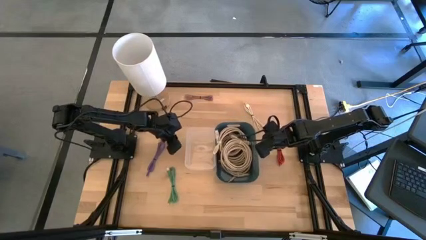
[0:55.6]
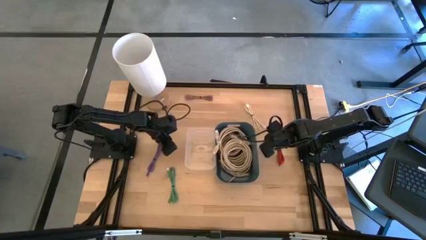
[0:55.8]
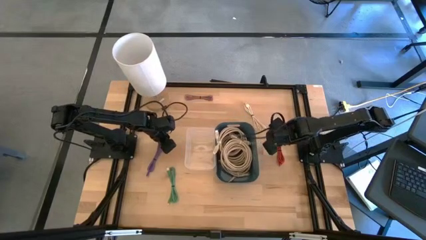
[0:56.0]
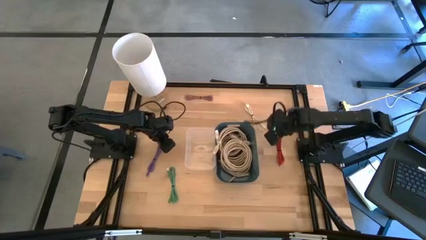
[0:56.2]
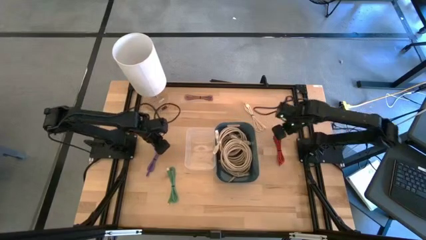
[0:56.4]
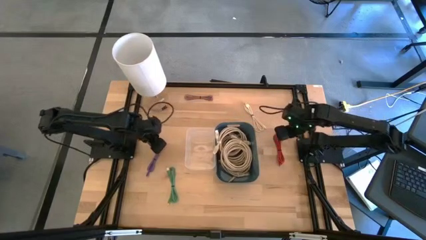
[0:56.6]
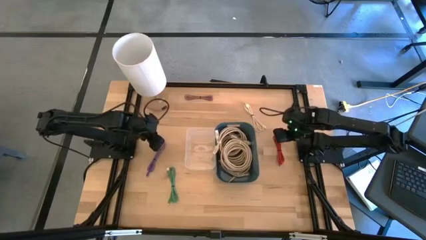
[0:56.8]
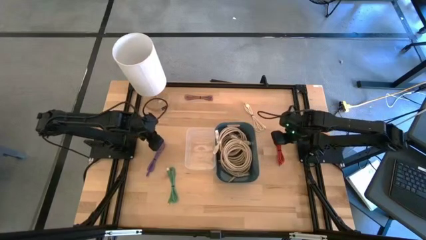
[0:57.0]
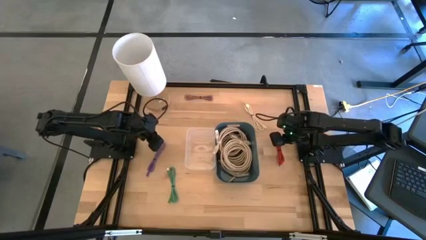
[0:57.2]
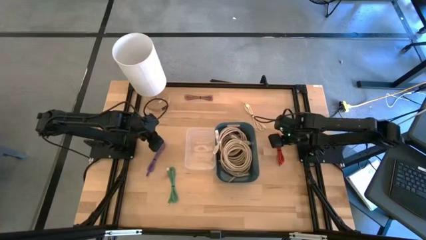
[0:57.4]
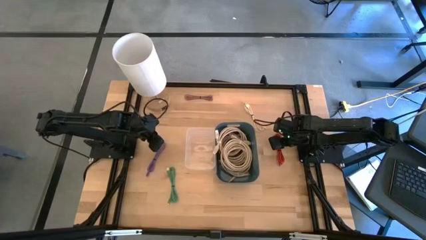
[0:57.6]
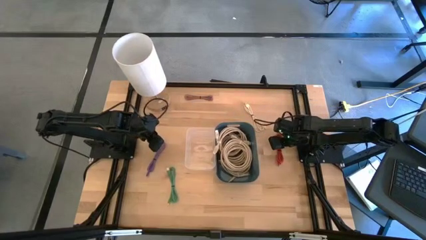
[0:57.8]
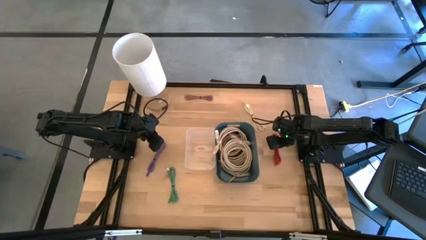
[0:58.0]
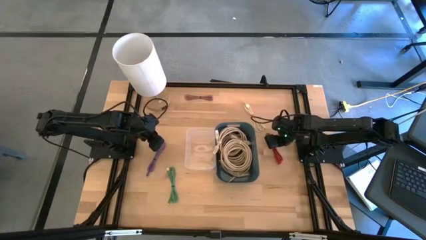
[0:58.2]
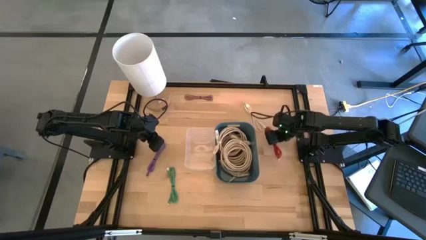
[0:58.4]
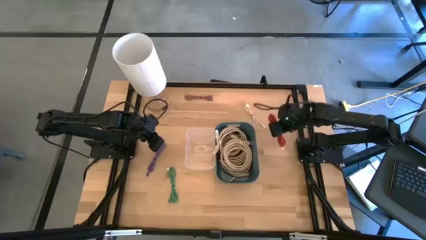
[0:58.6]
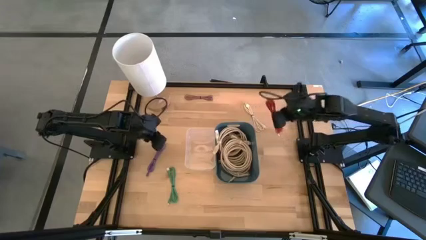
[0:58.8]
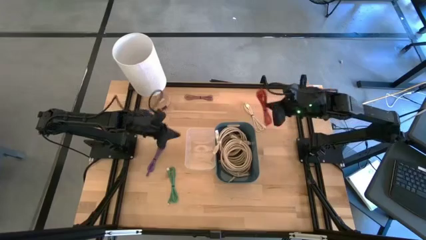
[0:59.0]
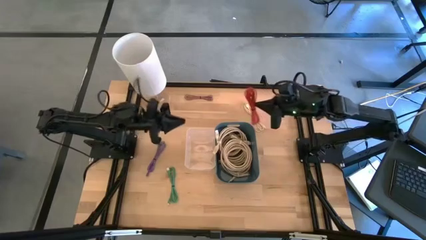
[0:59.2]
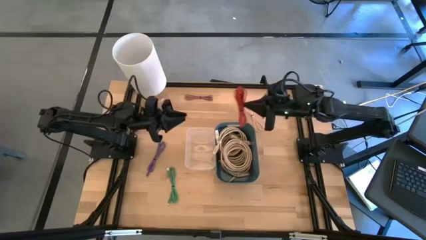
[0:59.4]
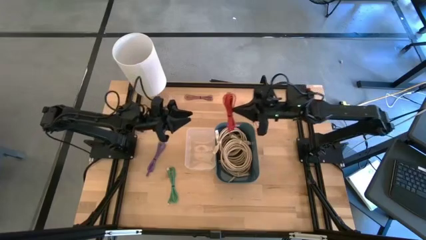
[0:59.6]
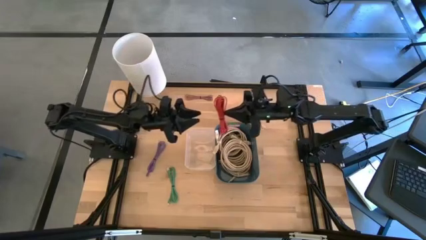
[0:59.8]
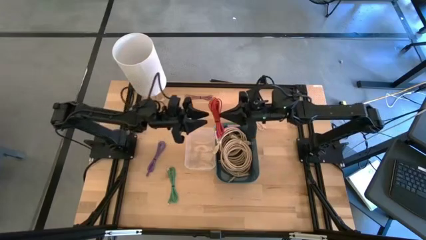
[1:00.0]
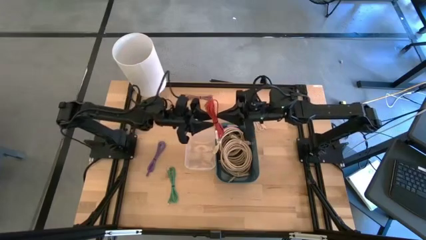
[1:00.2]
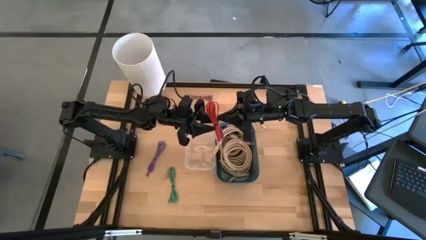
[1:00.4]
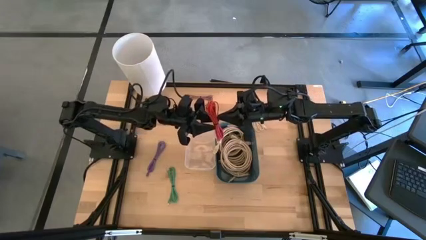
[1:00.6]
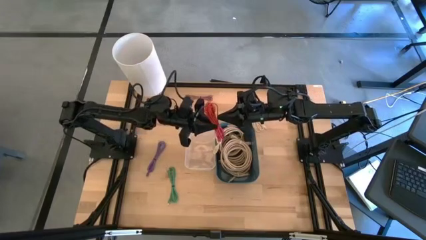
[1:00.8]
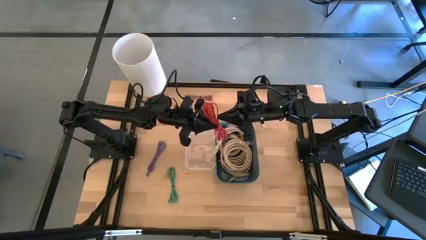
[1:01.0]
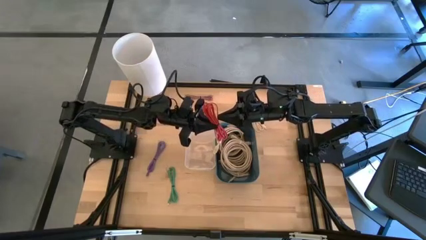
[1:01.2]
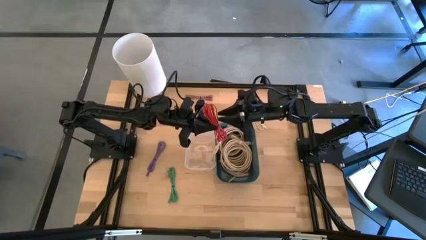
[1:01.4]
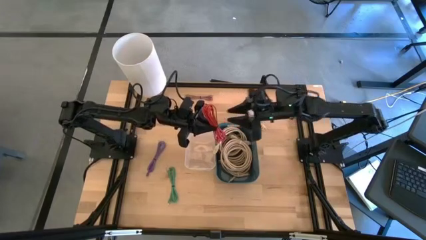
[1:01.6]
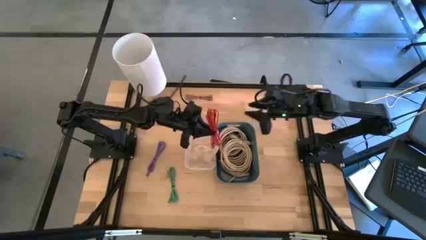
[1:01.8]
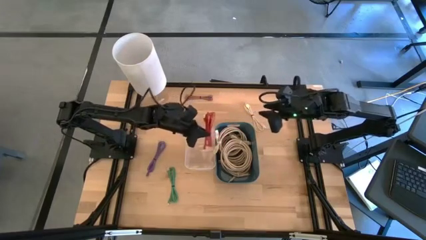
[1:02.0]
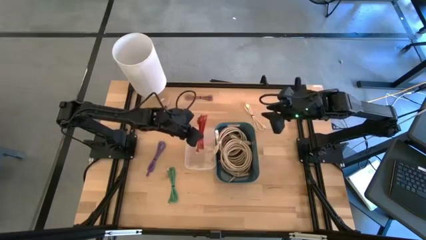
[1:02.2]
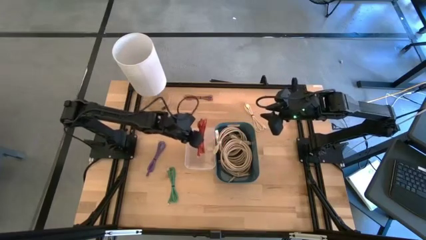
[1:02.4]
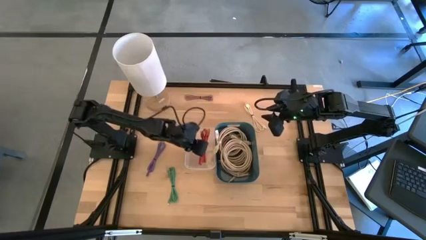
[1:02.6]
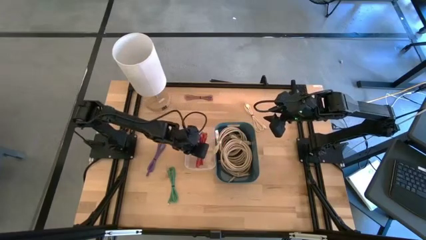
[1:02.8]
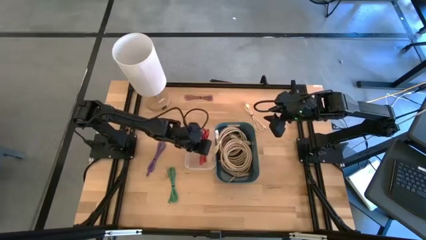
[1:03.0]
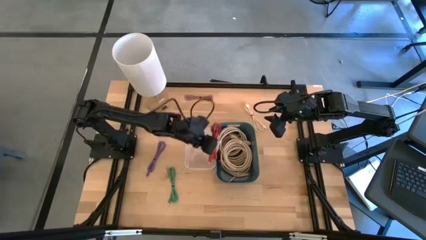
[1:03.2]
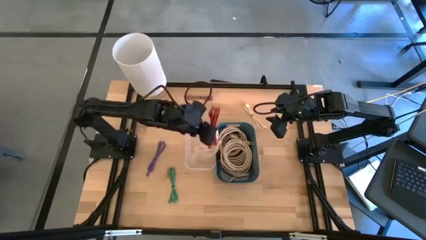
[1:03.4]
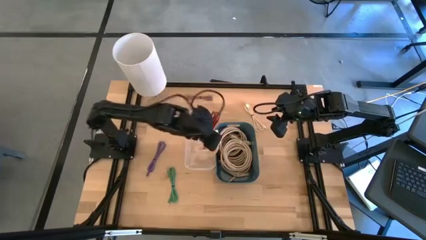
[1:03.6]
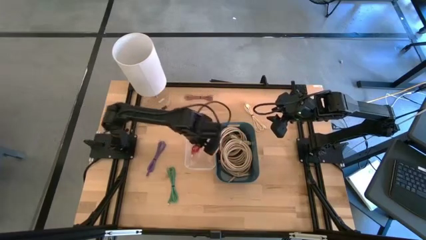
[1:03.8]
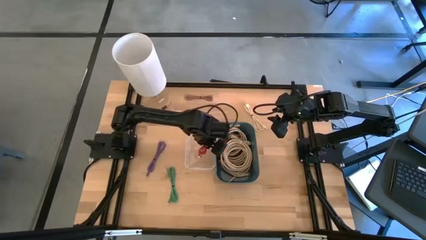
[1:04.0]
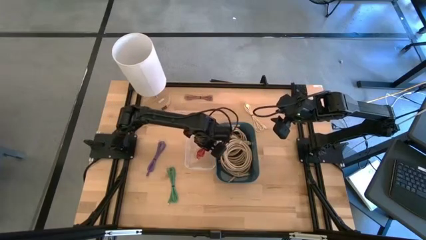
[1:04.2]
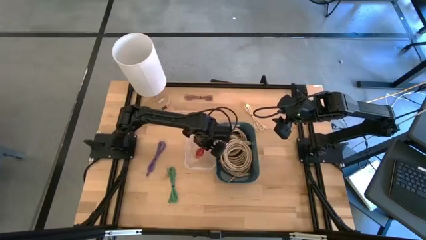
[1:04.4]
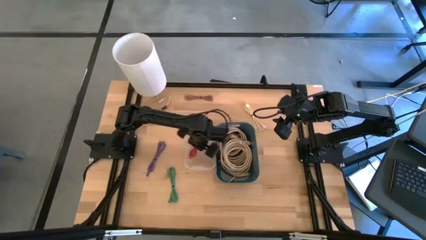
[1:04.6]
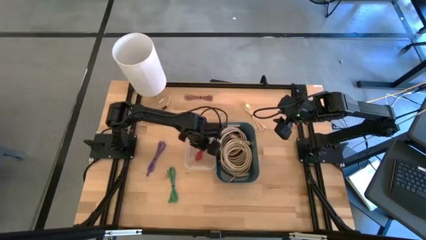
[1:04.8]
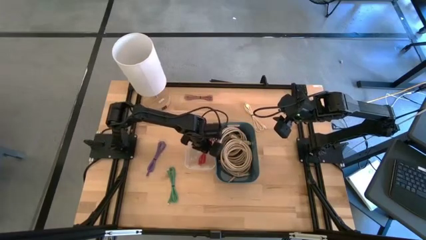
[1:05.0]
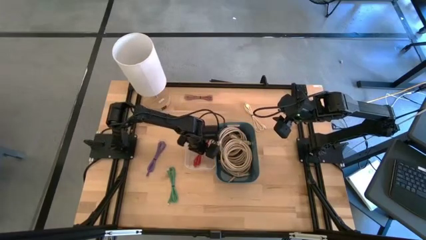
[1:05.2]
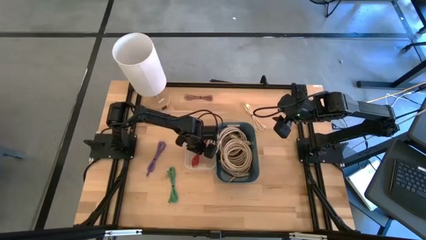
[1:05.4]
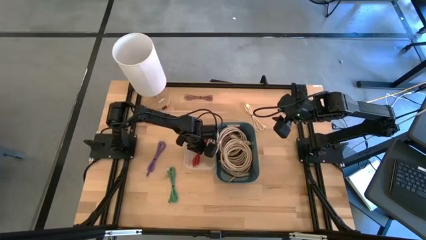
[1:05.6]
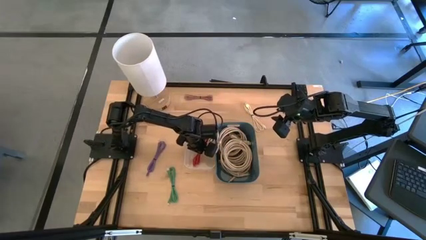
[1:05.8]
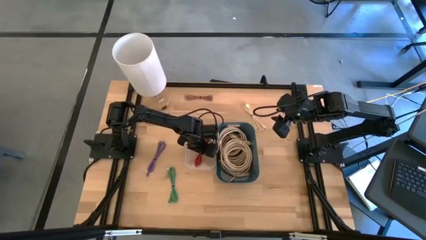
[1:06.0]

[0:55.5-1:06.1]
Put the red charger cable into the white transparent bin

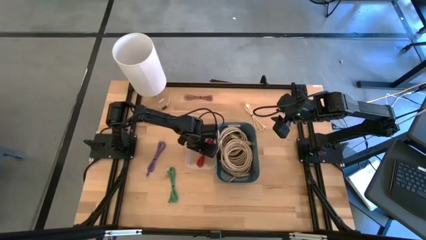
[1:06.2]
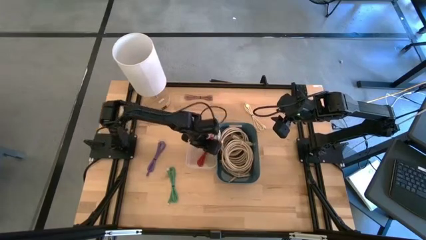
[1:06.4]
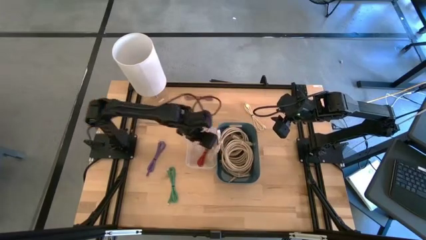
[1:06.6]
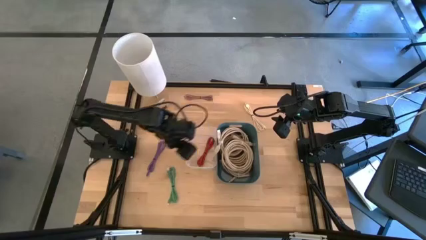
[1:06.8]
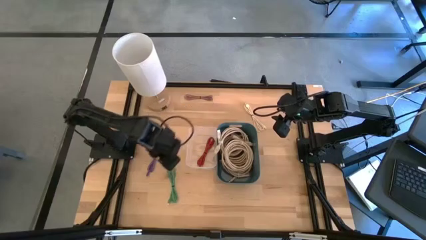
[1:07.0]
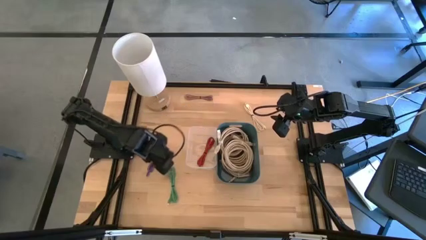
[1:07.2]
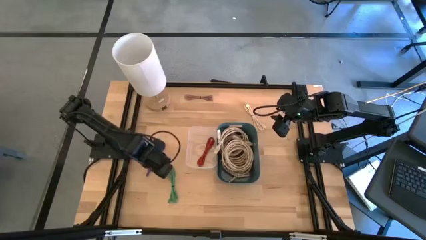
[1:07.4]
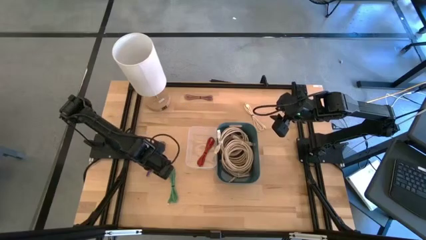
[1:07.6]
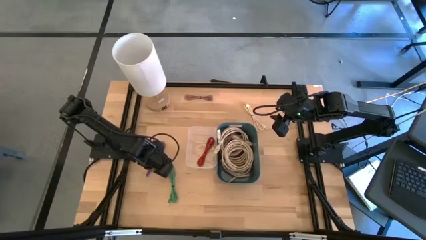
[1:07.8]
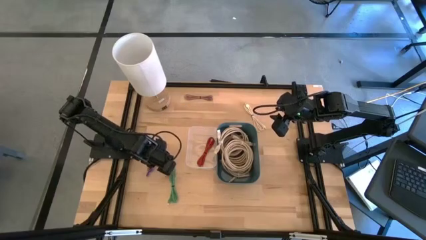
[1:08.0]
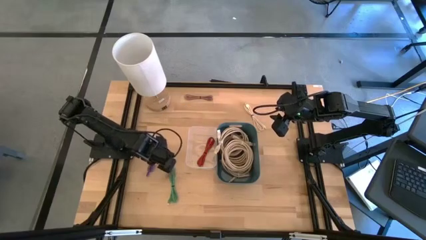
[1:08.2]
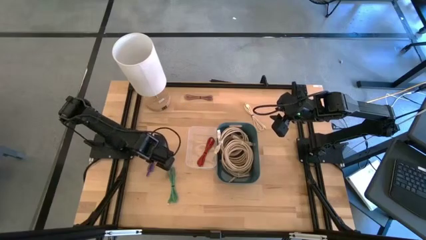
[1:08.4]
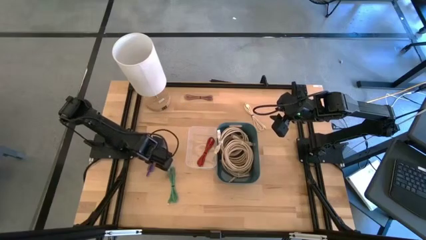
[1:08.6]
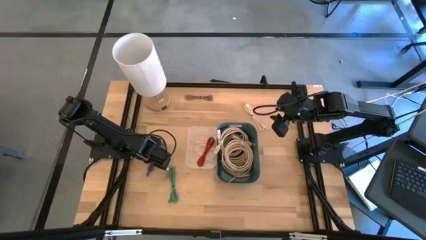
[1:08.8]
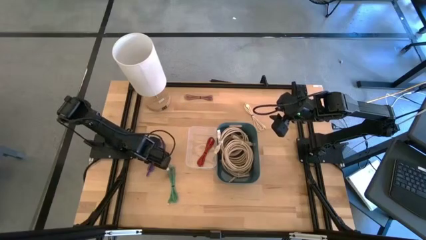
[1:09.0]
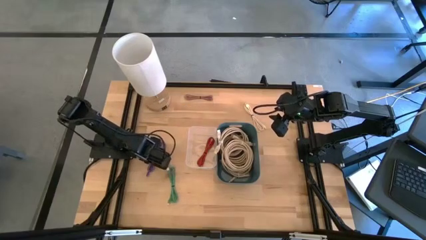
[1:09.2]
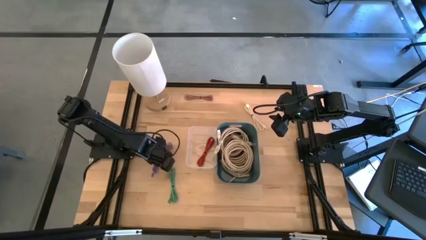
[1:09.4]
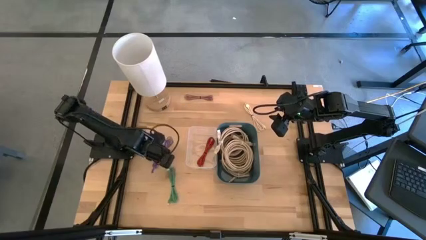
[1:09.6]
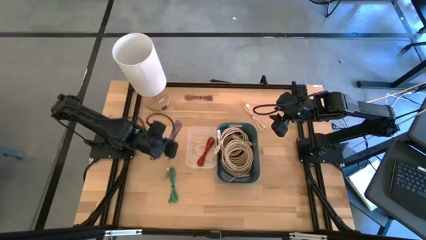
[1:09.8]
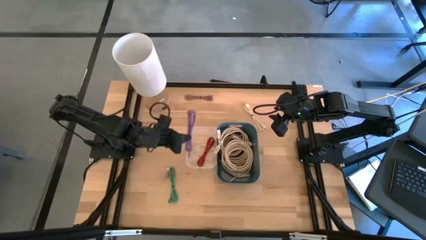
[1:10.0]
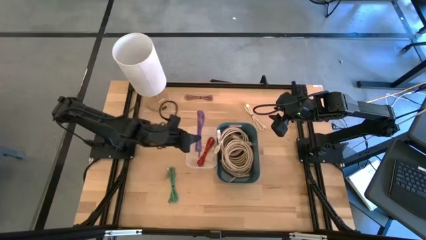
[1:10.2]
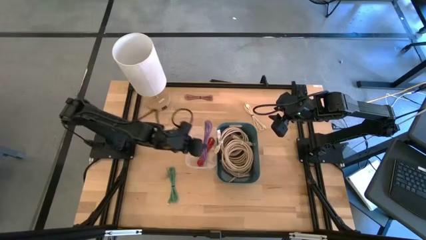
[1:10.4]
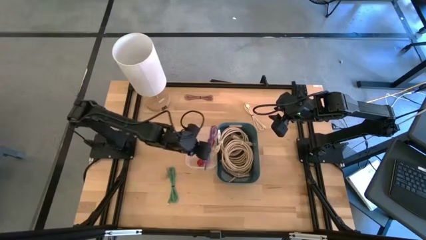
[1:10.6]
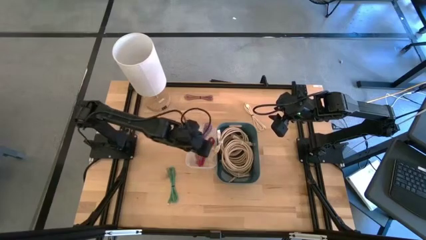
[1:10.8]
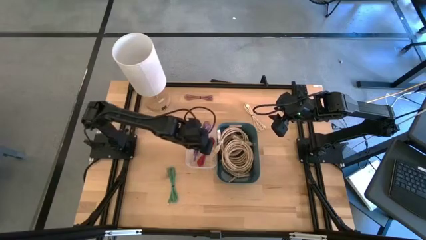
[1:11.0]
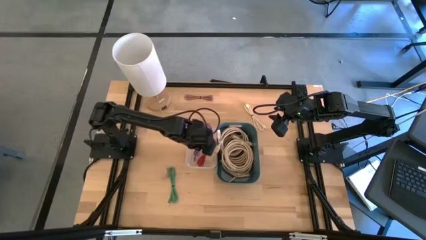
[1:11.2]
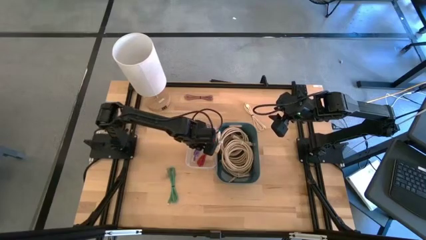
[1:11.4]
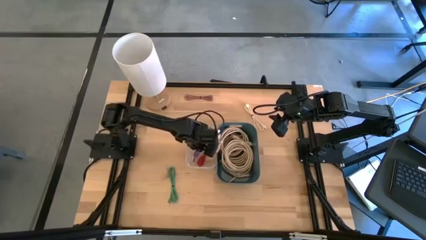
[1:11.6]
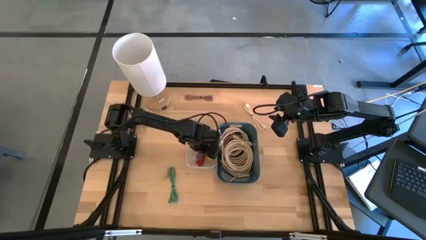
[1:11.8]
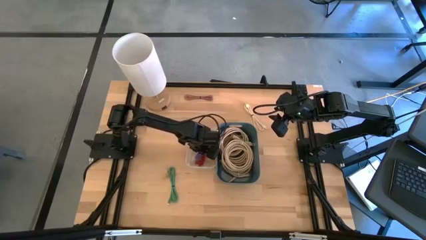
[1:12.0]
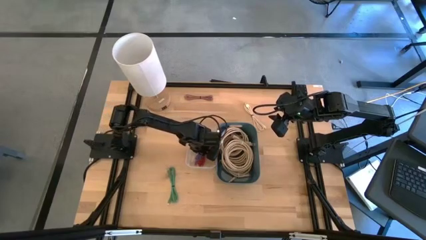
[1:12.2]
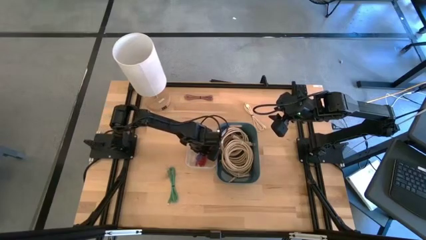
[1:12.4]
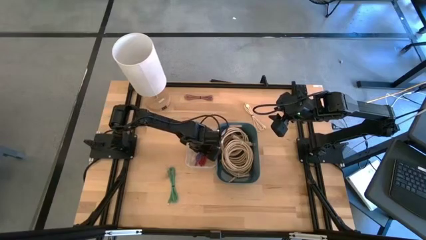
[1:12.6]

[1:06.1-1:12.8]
Put the purple charger cable into the white transparent bin
